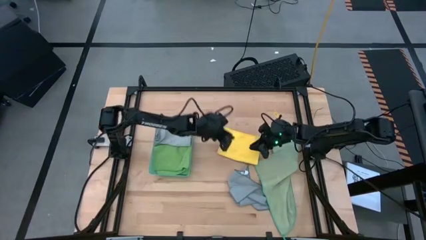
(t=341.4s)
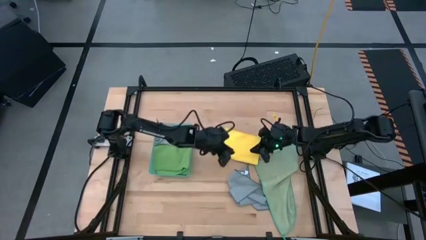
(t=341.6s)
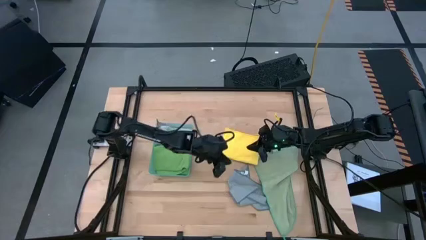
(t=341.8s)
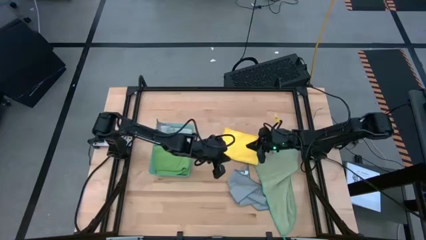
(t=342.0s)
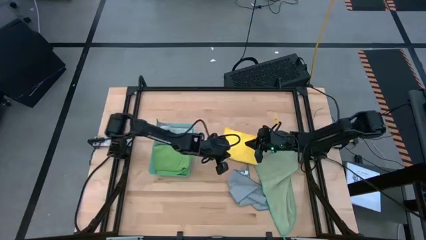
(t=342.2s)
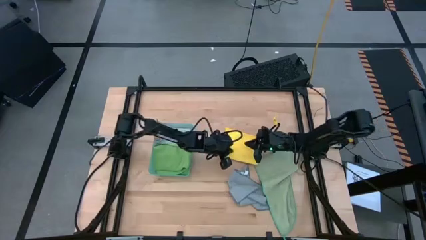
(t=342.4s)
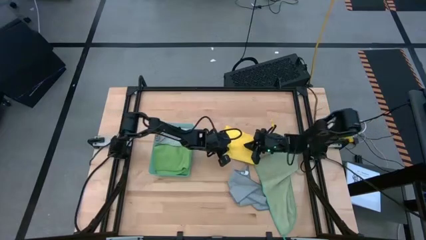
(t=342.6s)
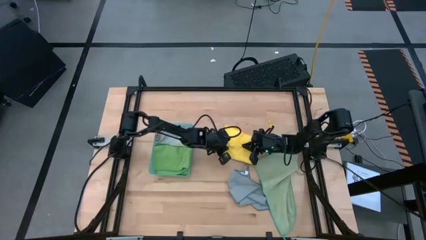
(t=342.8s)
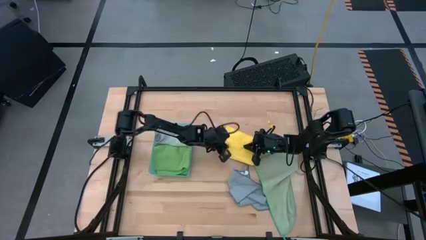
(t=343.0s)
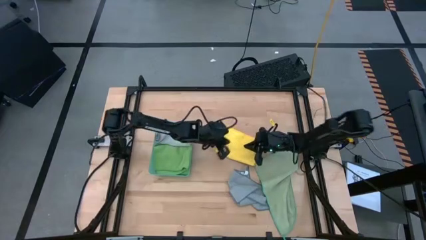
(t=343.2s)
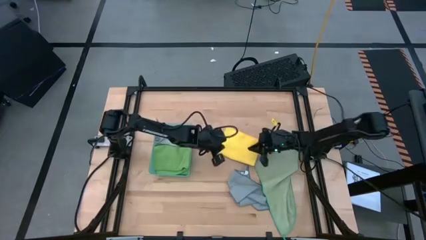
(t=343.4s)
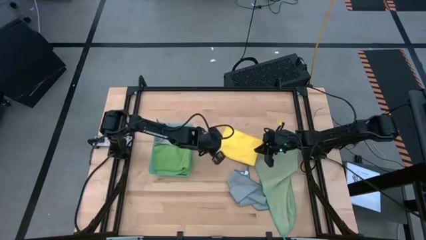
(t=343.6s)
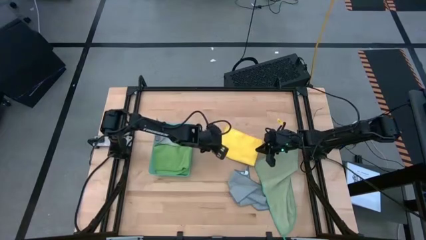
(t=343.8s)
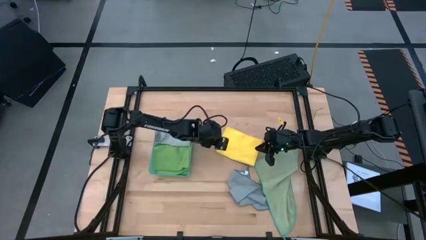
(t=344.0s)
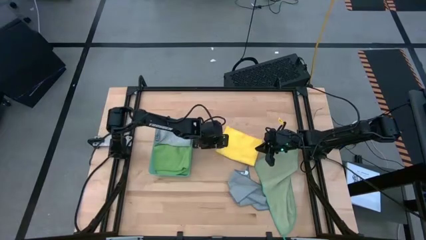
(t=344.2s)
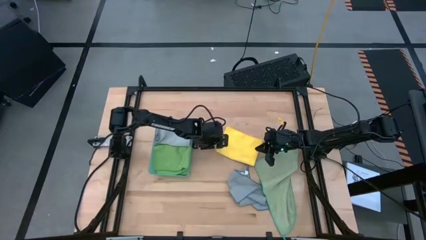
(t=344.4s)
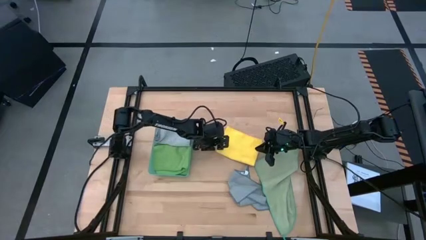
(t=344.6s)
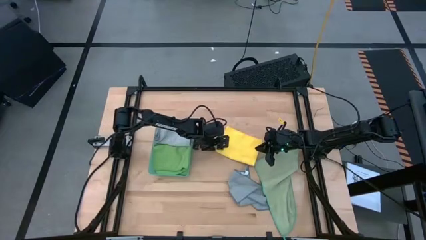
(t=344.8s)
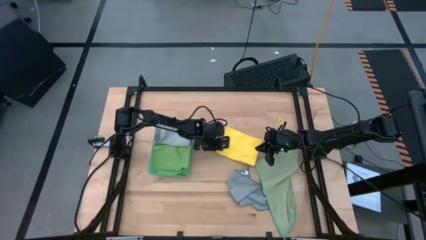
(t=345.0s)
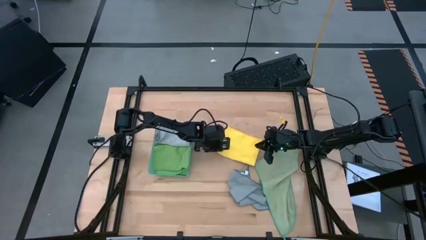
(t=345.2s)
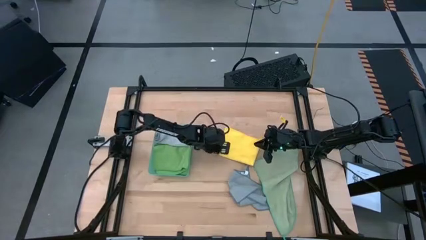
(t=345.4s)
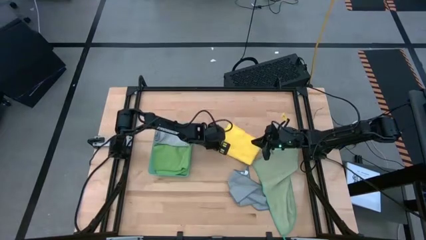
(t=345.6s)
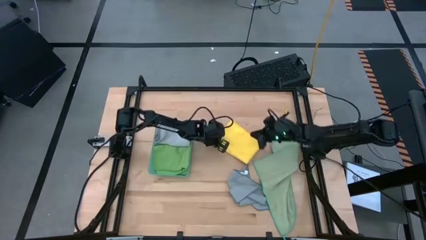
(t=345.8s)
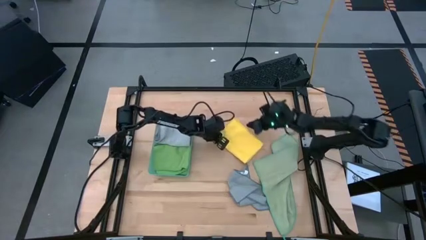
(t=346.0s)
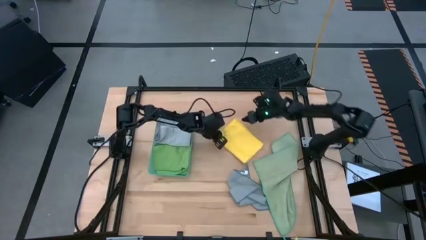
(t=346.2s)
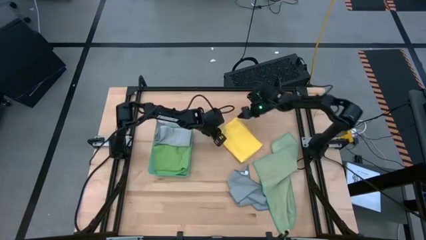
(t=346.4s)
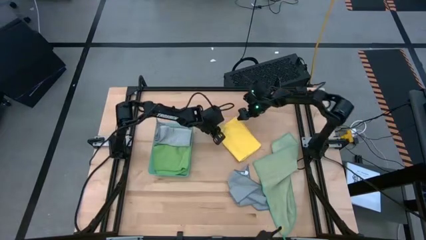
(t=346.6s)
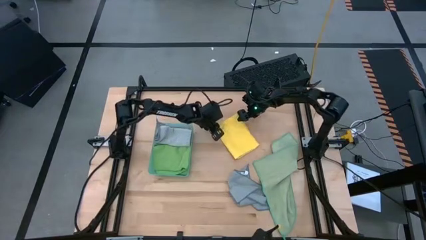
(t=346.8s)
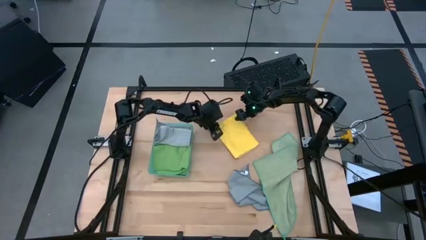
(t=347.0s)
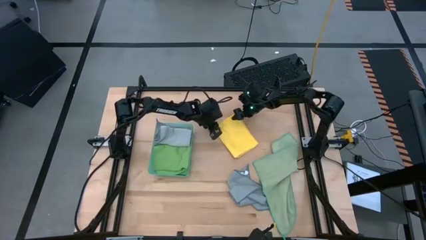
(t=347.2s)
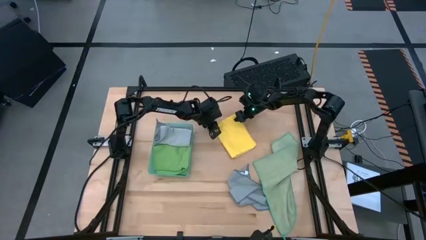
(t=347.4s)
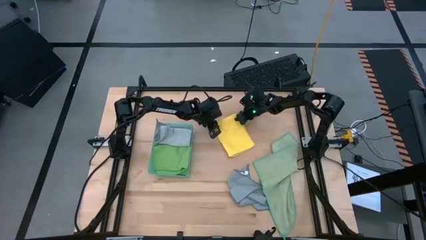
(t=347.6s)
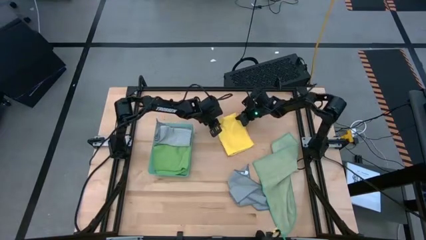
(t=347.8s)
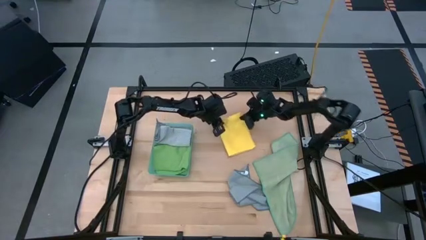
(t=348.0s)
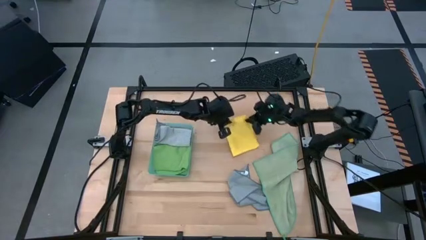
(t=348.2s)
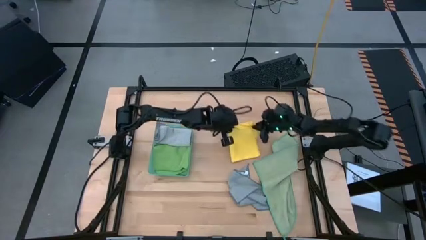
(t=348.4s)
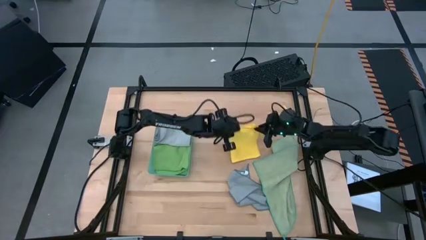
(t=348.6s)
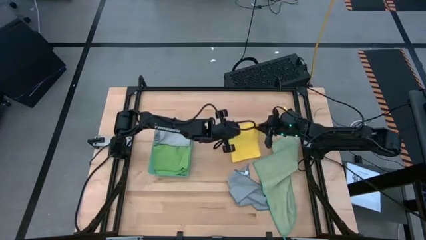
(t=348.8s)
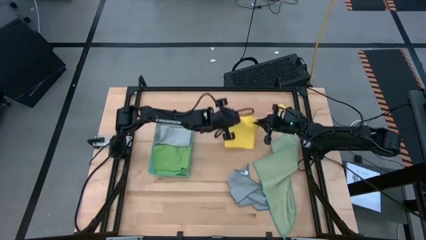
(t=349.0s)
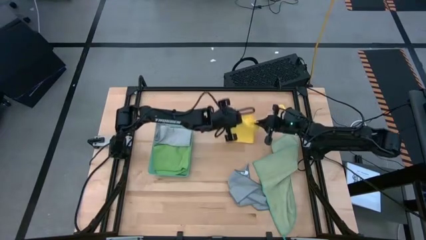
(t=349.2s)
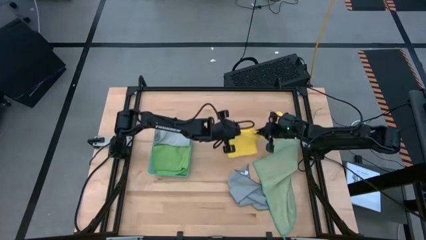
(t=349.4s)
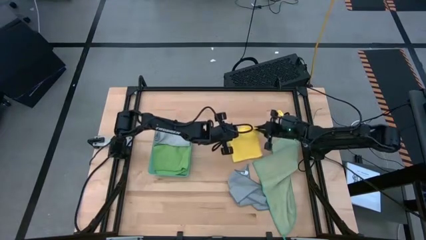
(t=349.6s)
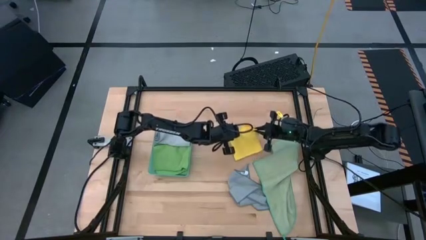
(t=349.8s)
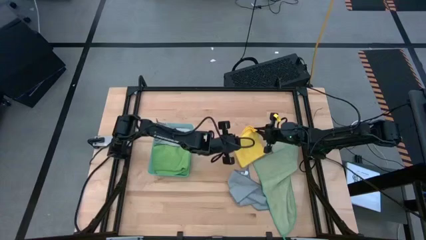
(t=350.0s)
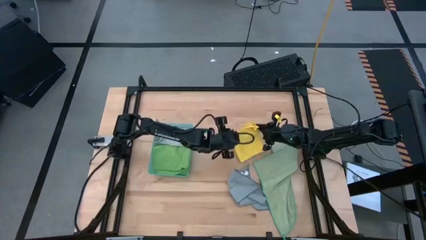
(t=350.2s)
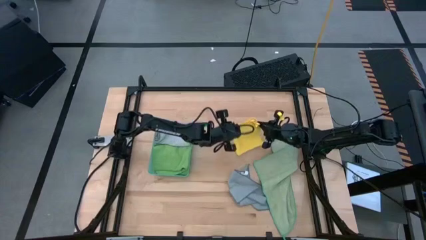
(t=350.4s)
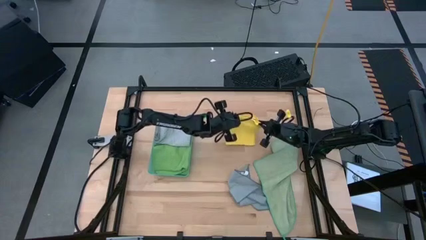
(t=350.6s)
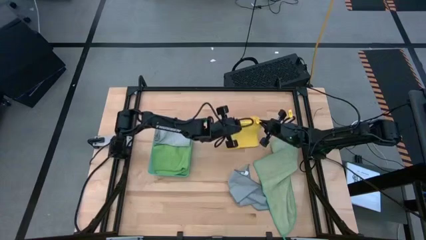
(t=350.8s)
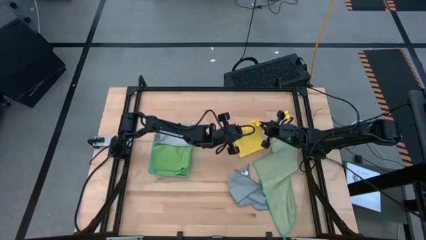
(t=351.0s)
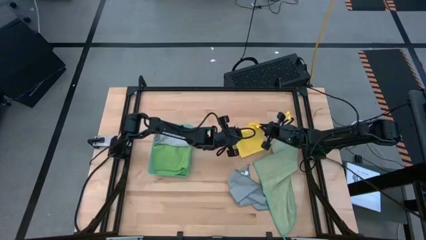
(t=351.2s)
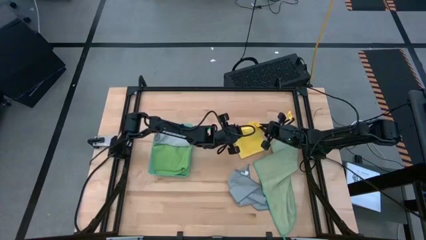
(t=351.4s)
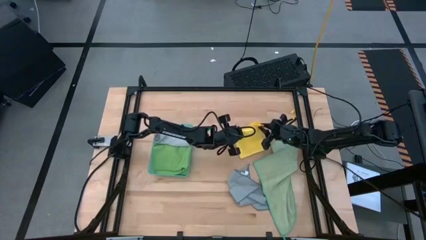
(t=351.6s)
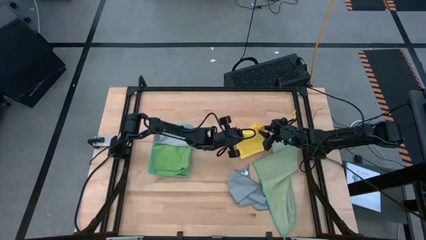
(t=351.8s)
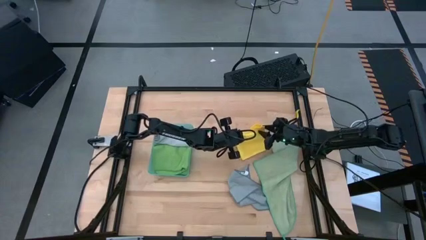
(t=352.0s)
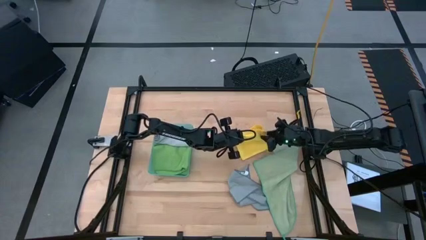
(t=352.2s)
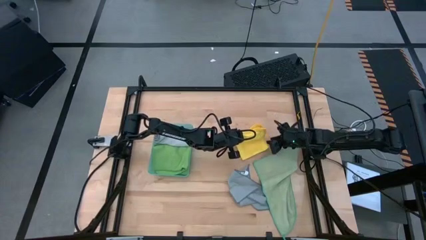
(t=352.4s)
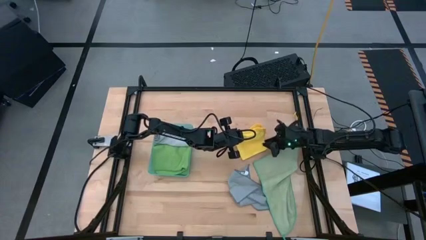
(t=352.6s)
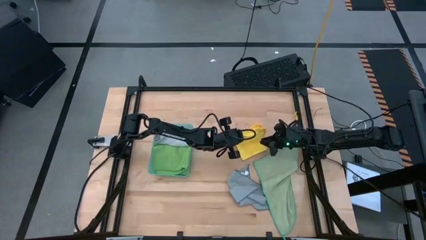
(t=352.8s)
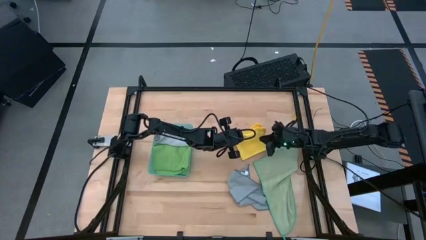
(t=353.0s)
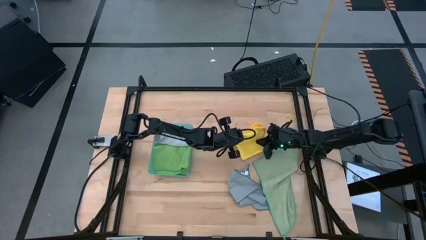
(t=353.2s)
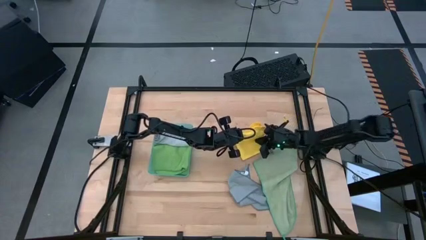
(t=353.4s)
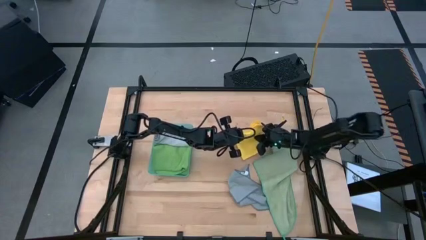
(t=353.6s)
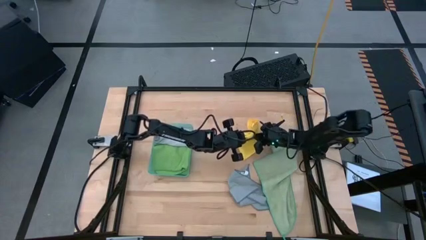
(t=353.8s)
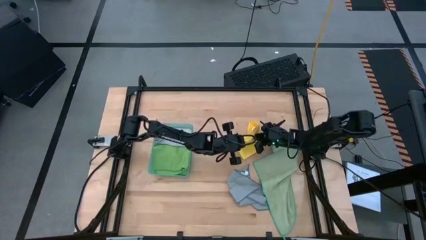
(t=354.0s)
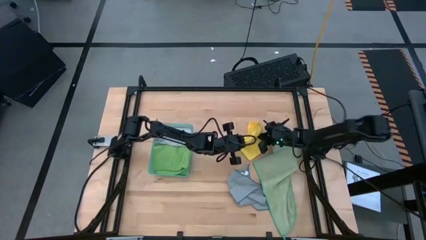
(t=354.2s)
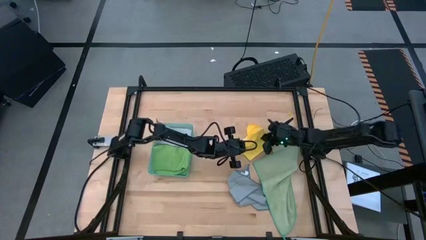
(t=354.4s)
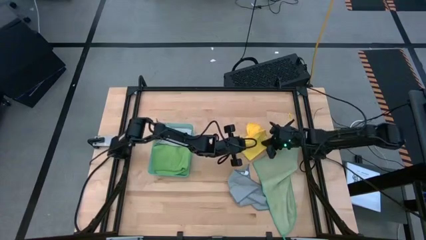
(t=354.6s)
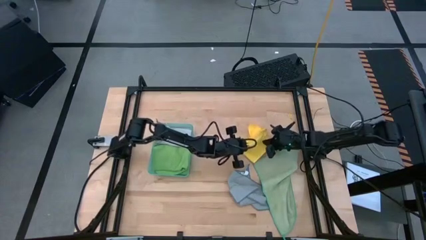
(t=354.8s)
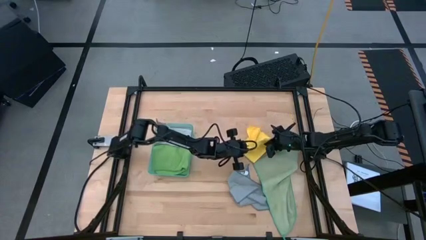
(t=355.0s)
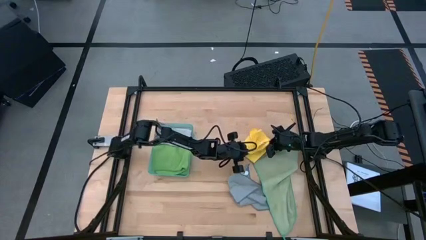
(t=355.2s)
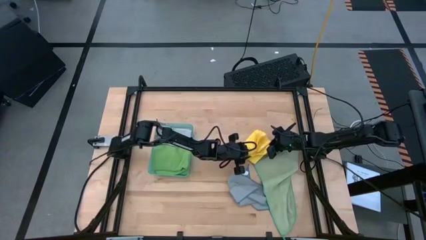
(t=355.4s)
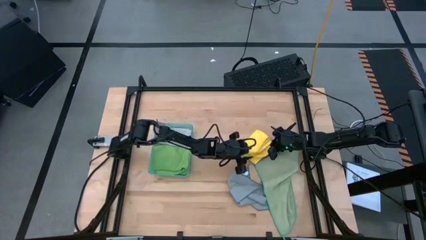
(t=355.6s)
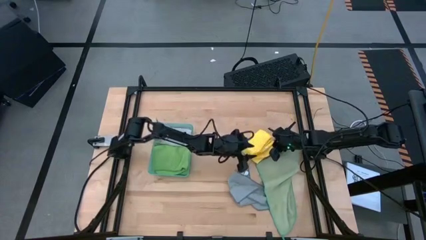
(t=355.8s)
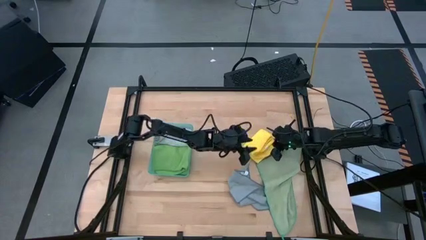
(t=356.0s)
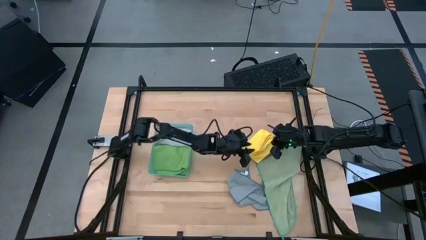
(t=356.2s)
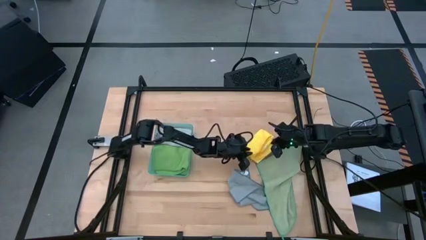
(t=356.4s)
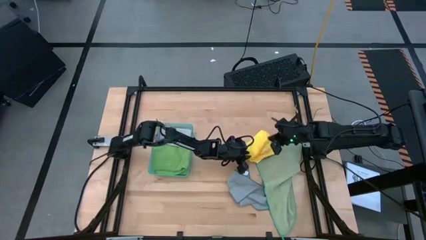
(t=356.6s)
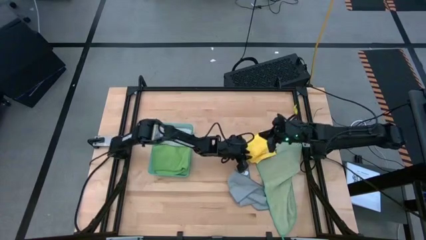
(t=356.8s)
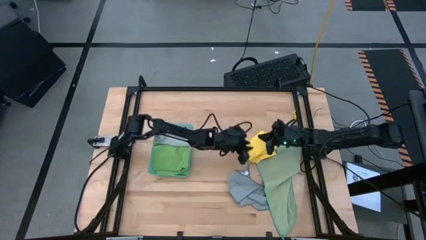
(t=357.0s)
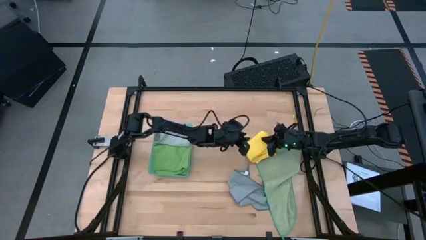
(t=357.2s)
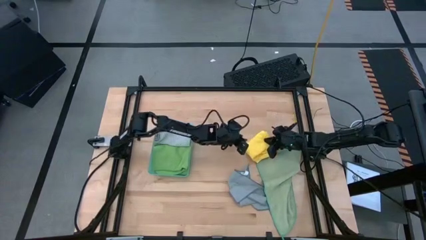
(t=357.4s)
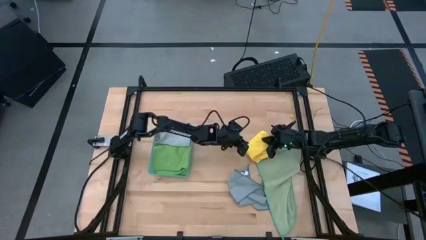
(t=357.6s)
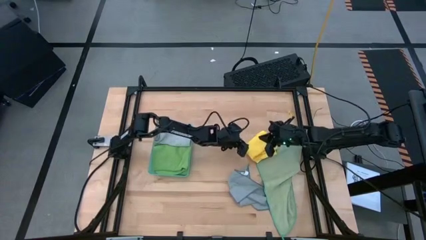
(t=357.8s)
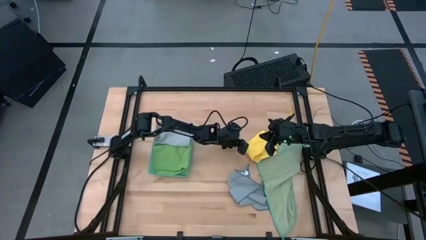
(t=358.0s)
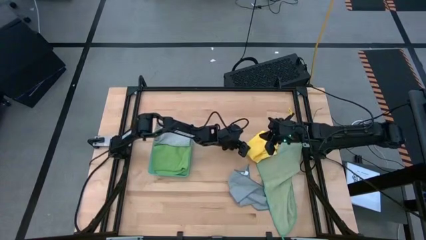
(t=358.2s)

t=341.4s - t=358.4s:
Task: Fold microfiber towels
Fold the yellow microfiber cloth
